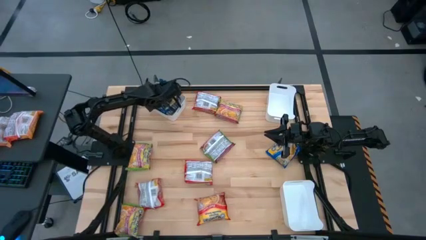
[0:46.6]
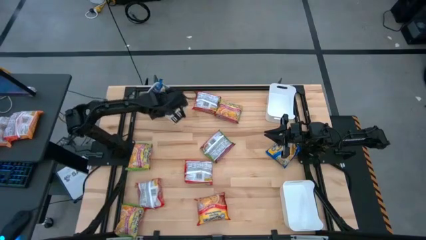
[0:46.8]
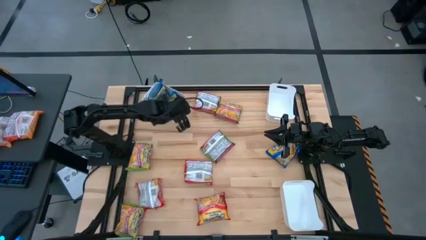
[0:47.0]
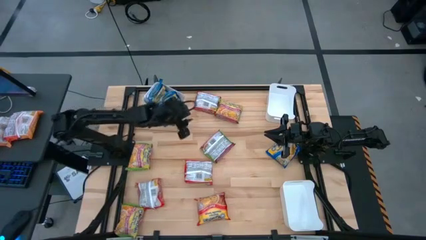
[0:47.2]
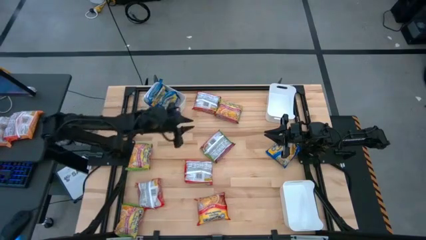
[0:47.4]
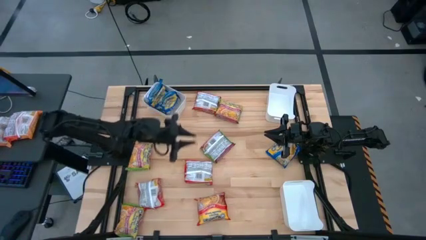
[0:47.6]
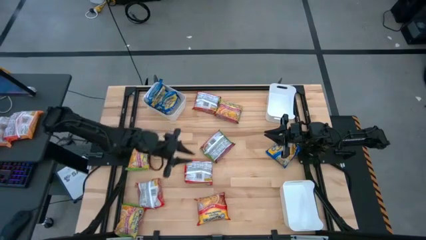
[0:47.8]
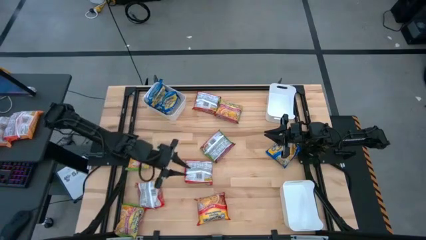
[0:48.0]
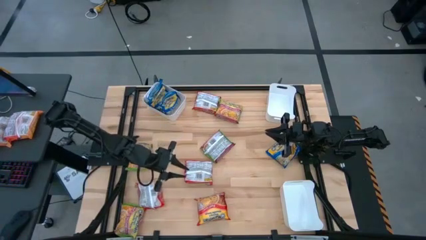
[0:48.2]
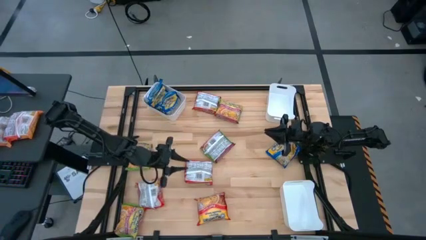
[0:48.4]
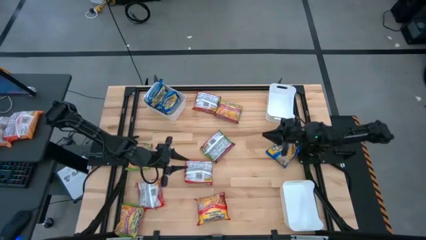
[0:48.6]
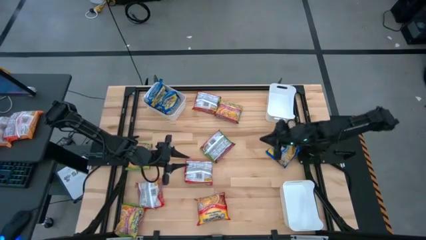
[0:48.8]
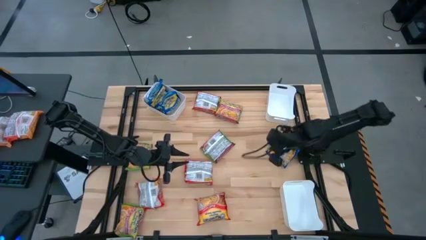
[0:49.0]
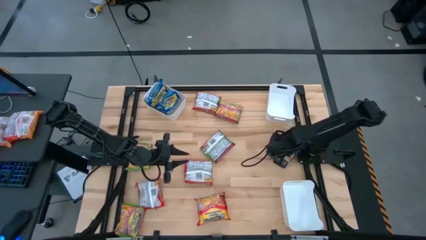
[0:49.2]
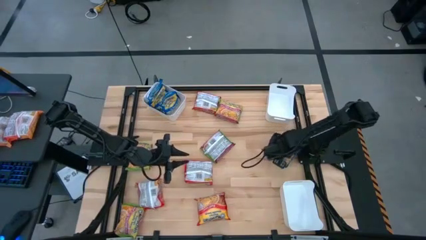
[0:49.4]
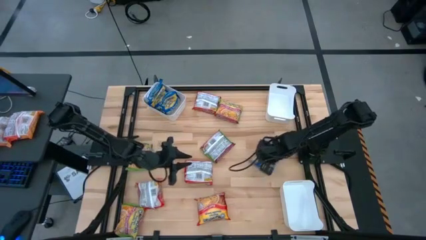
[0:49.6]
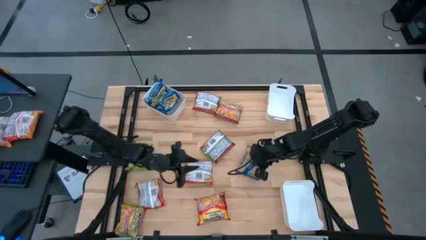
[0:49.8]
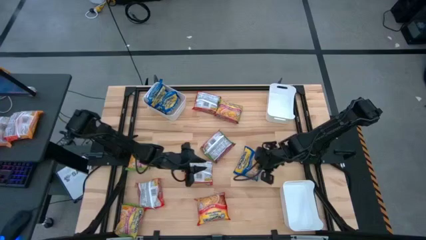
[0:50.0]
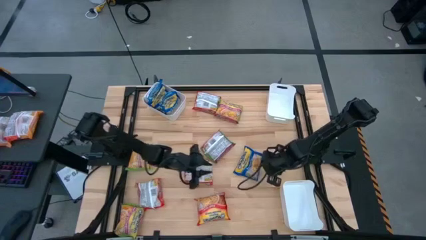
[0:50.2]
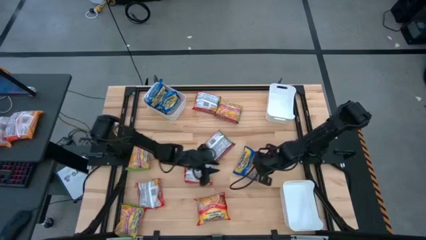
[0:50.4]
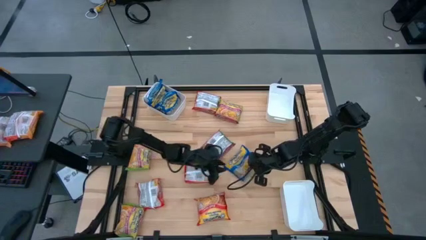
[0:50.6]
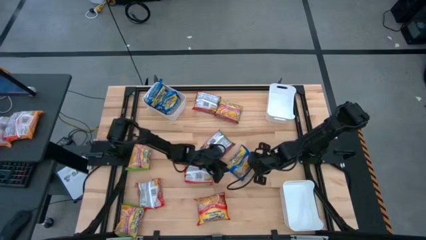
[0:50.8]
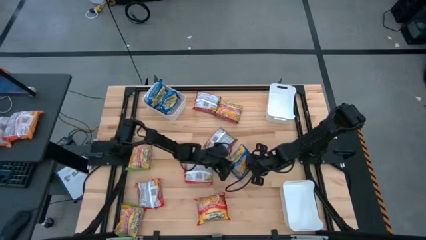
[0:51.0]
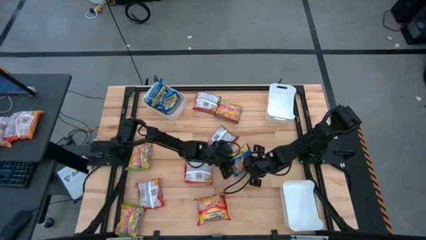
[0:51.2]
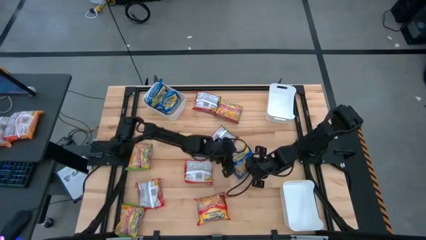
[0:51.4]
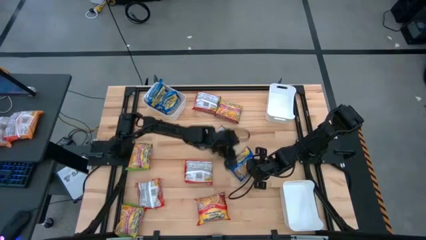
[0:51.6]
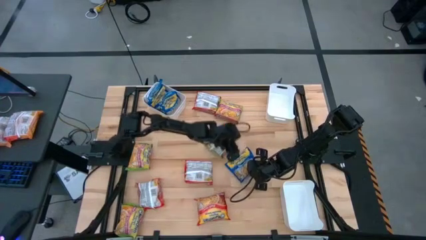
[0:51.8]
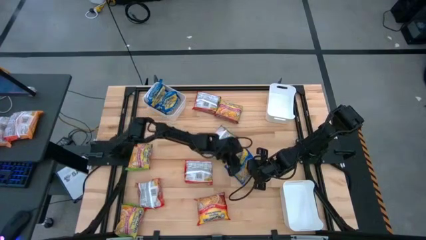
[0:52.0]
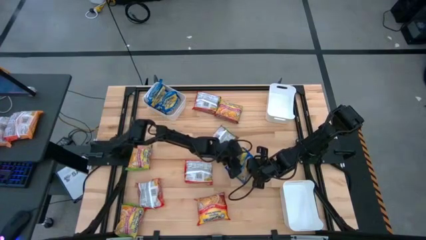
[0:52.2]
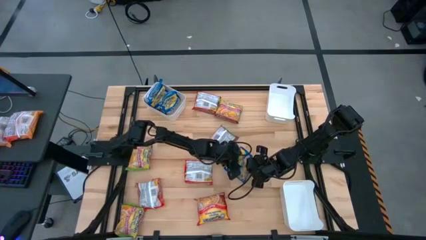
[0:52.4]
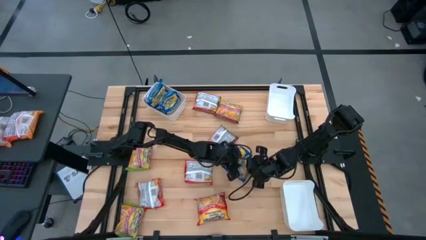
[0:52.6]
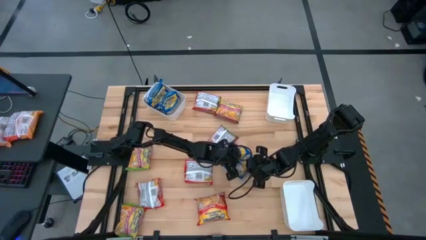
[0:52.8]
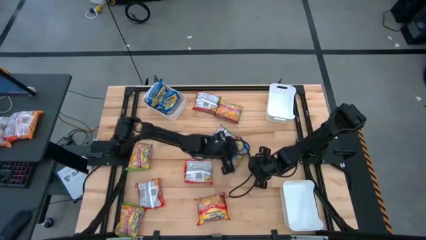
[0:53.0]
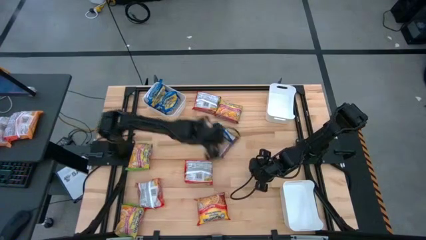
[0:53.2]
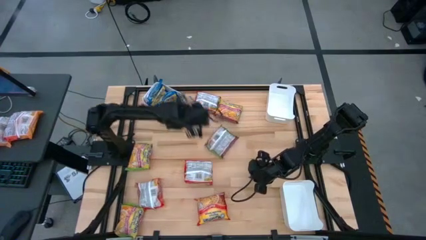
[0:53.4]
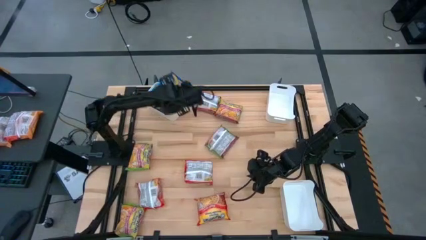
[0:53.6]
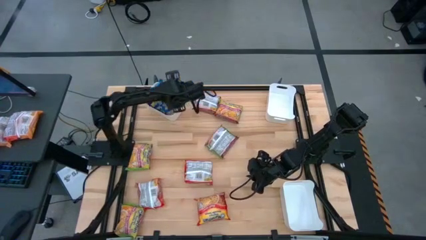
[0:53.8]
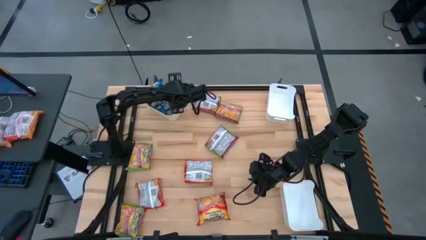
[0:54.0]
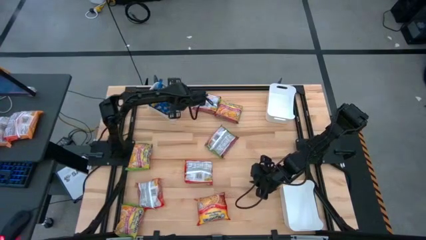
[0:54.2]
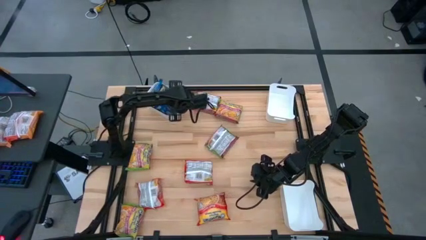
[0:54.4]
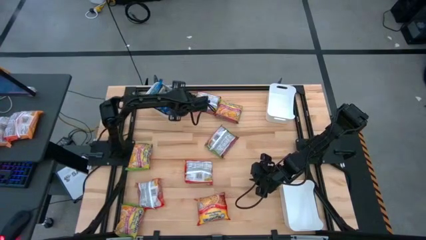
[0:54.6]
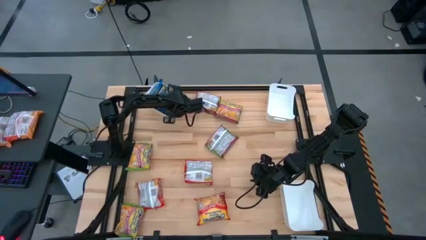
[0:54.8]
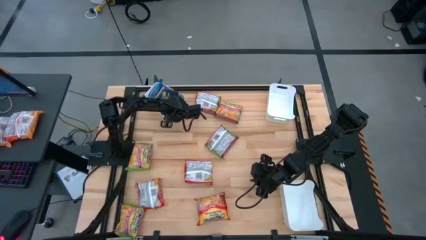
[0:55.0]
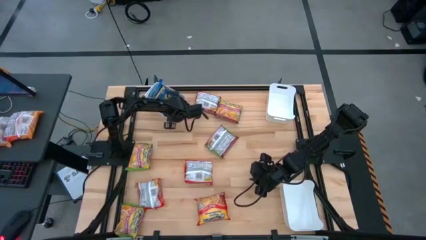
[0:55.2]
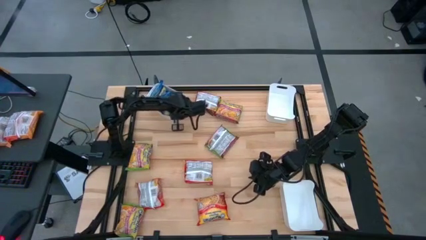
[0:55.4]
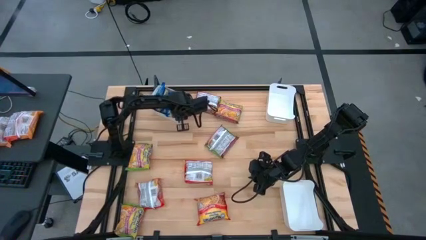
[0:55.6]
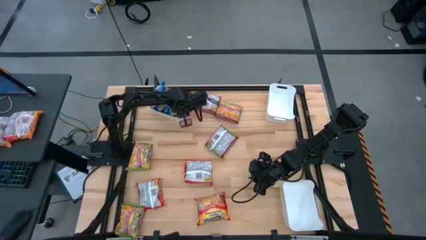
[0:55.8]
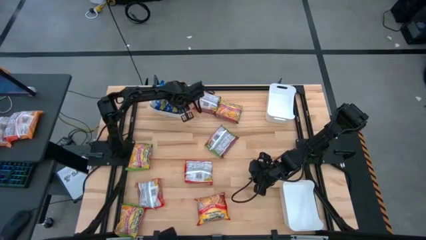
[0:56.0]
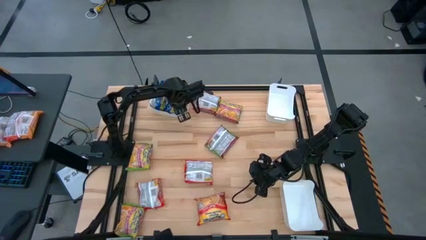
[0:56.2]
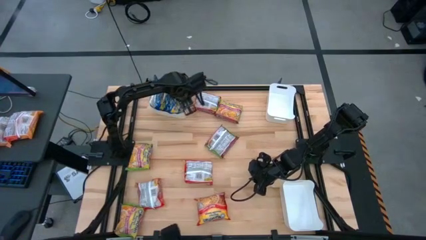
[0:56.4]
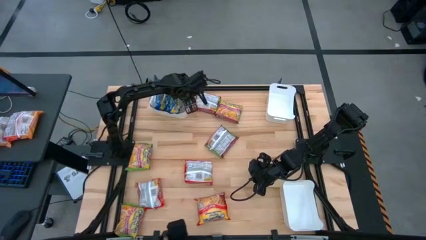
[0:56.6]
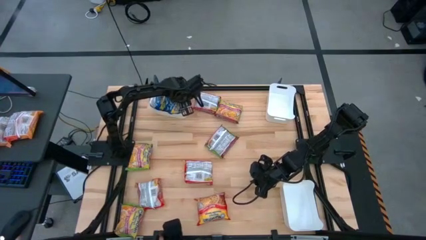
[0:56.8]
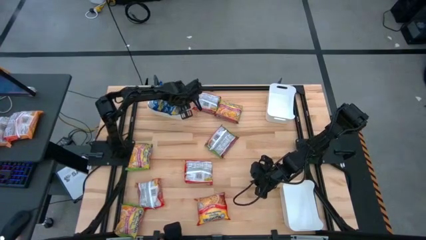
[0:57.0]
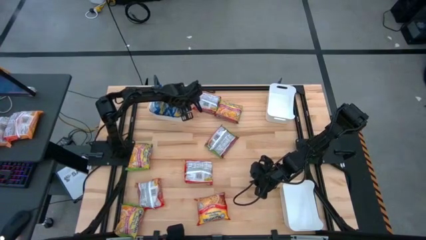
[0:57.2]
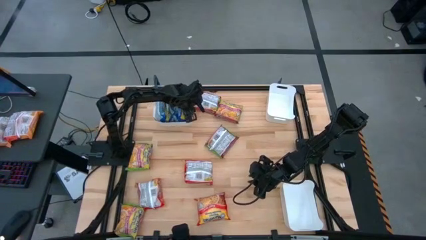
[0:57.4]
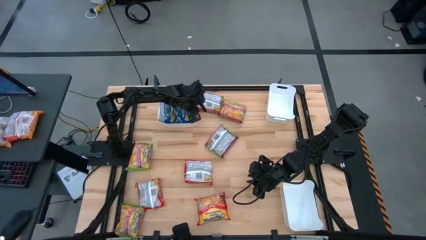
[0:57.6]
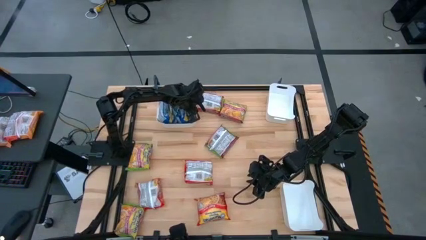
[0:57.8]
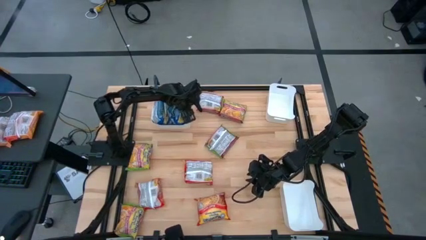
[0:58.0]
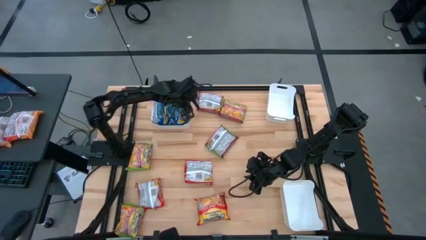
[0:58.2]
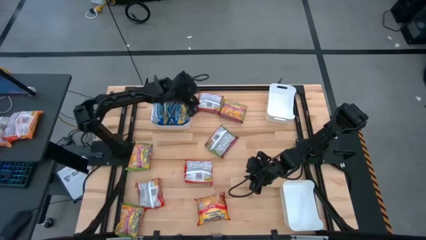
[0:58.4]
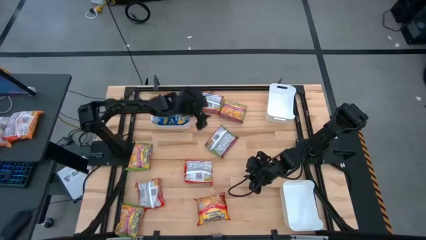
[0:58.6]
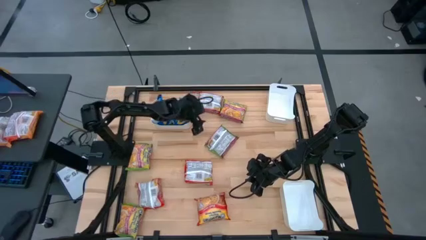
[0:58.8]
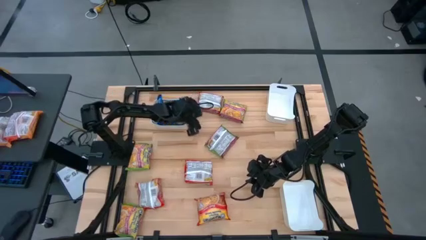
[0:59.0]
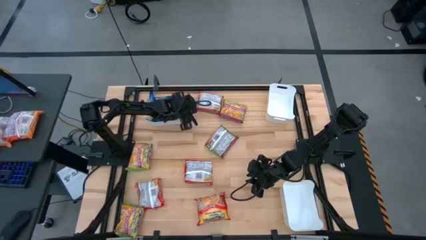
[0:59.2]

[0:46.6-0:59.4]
Task: Sort Maruchan noodles
Put the blue noodle pack into the top left white bin
